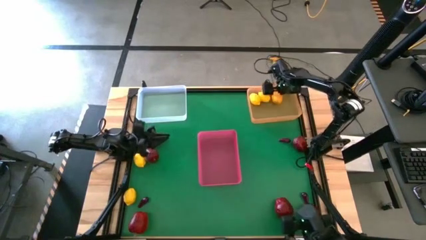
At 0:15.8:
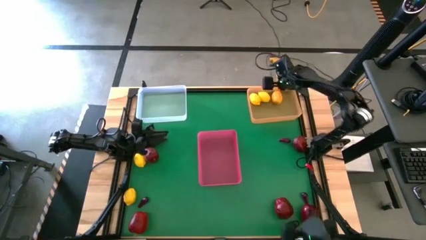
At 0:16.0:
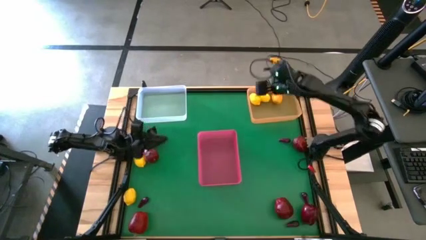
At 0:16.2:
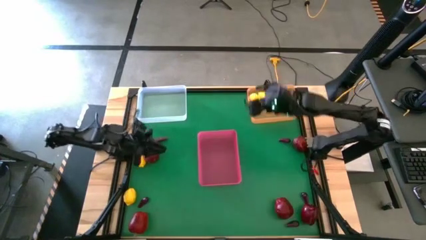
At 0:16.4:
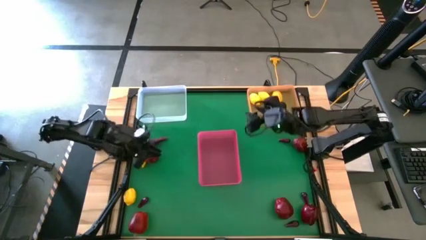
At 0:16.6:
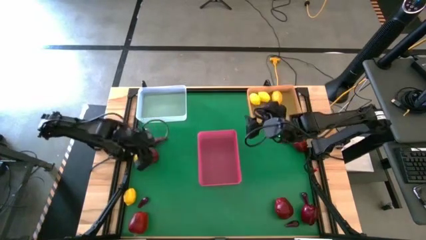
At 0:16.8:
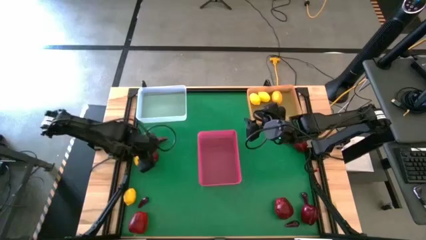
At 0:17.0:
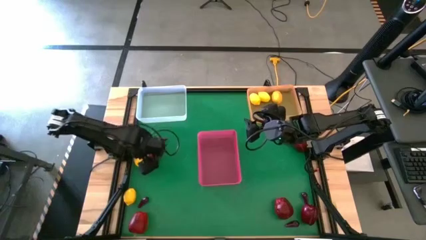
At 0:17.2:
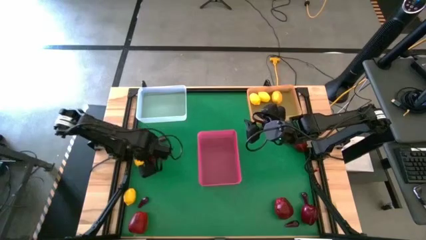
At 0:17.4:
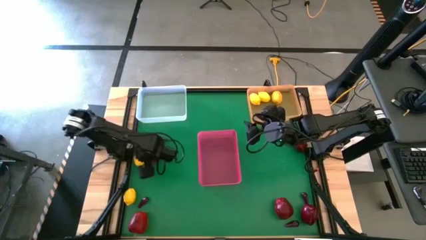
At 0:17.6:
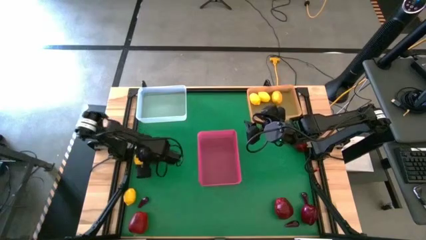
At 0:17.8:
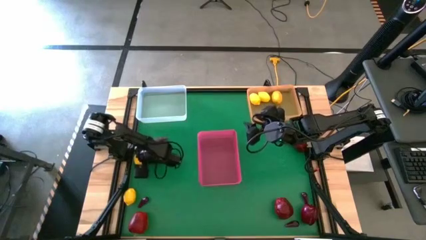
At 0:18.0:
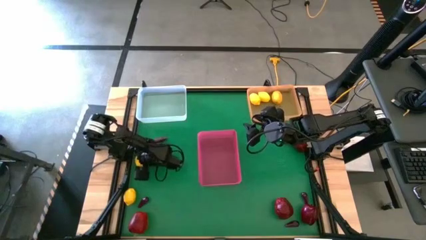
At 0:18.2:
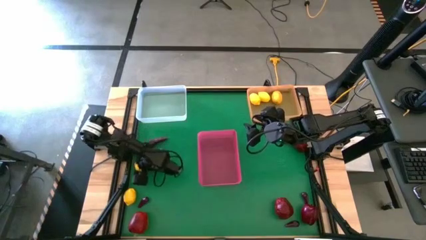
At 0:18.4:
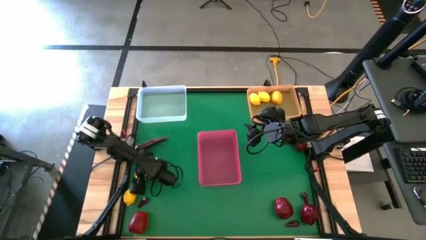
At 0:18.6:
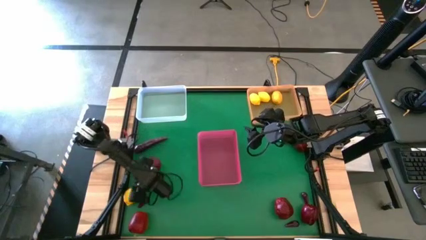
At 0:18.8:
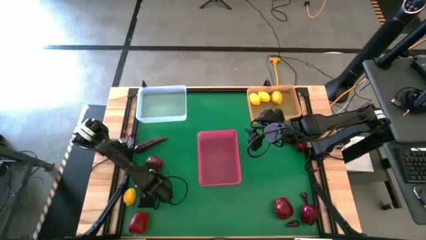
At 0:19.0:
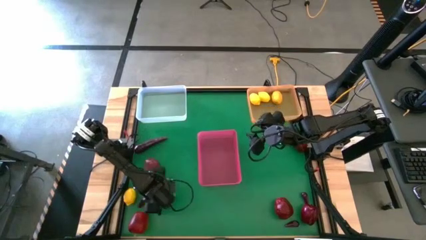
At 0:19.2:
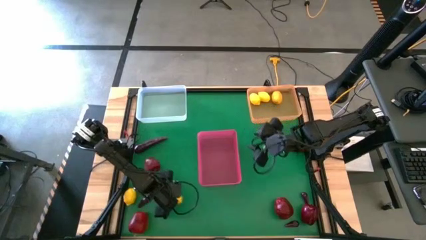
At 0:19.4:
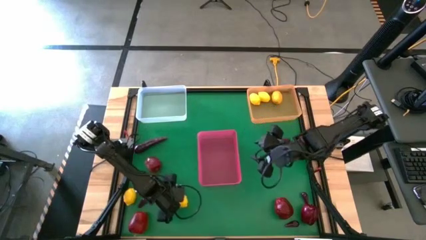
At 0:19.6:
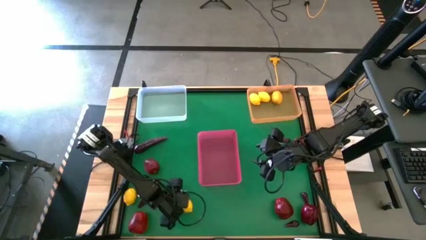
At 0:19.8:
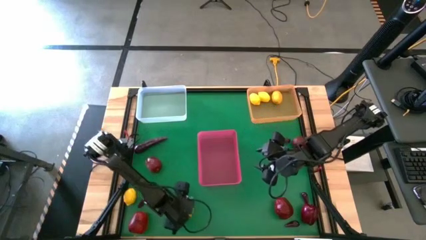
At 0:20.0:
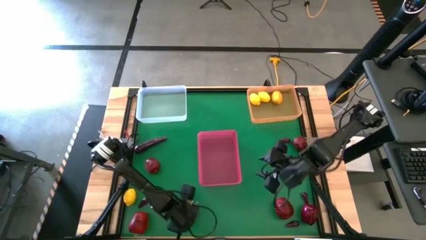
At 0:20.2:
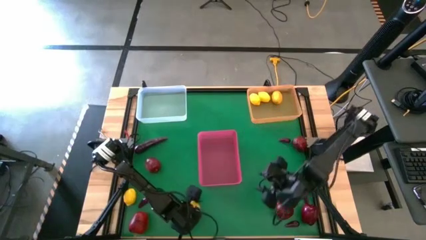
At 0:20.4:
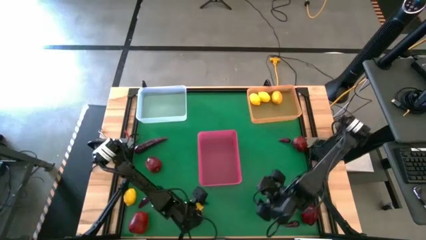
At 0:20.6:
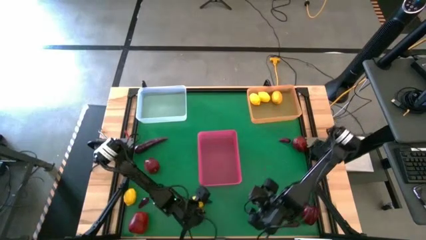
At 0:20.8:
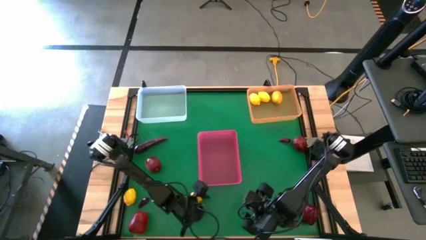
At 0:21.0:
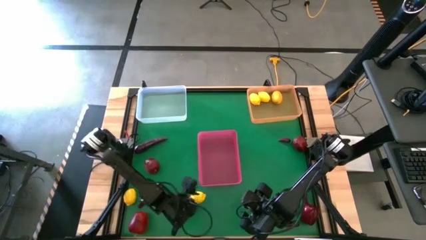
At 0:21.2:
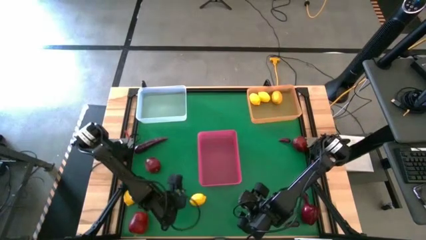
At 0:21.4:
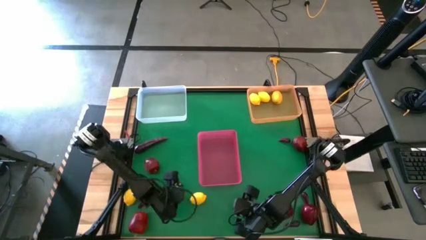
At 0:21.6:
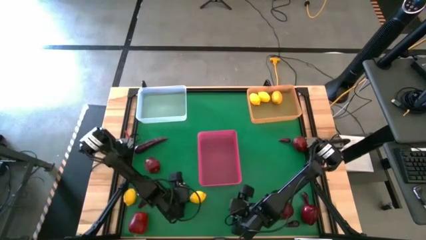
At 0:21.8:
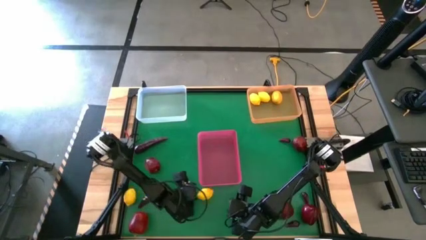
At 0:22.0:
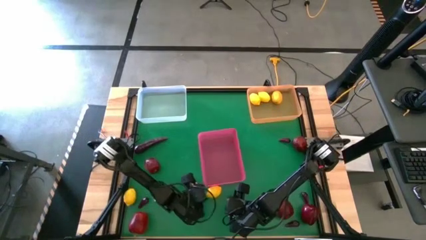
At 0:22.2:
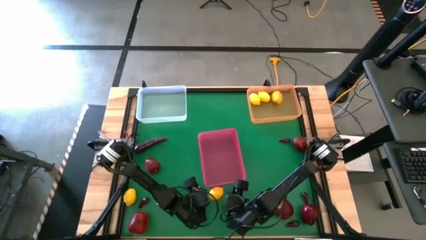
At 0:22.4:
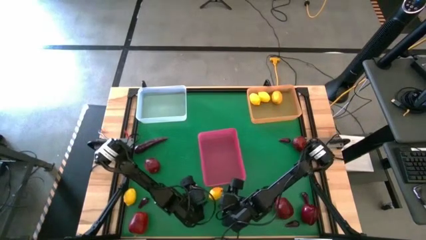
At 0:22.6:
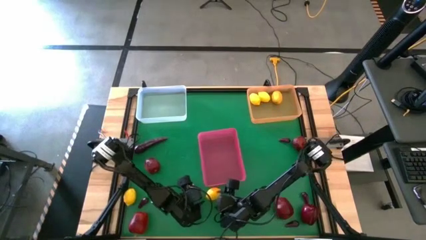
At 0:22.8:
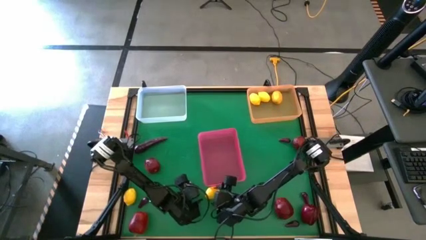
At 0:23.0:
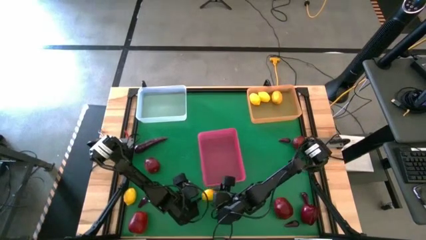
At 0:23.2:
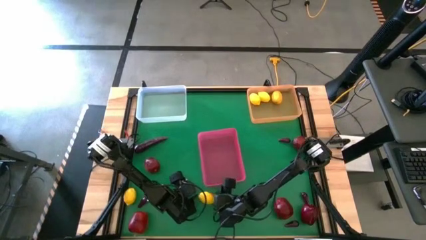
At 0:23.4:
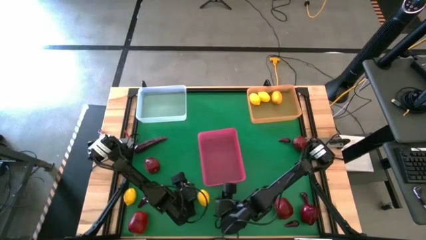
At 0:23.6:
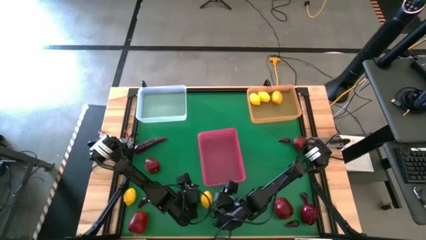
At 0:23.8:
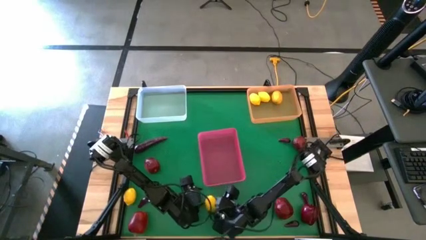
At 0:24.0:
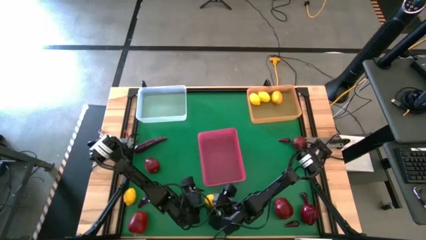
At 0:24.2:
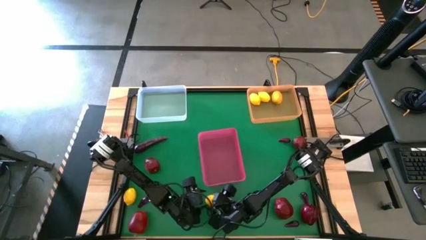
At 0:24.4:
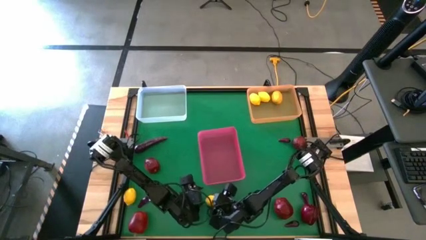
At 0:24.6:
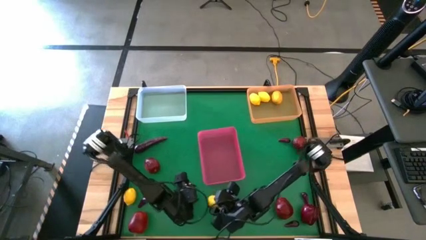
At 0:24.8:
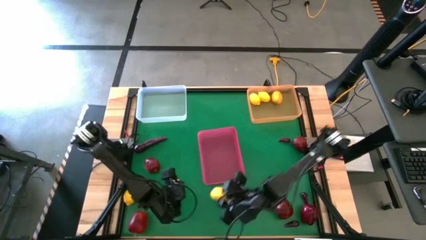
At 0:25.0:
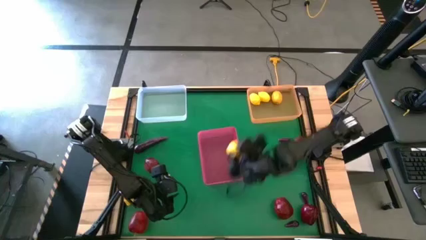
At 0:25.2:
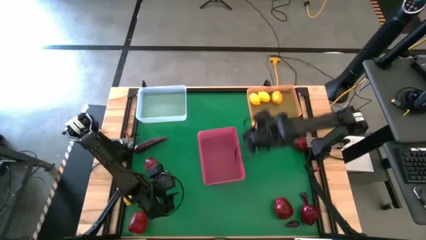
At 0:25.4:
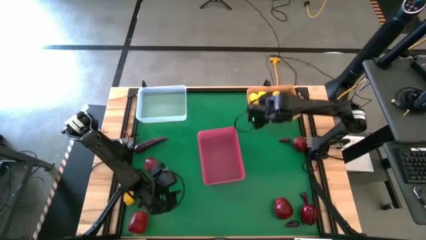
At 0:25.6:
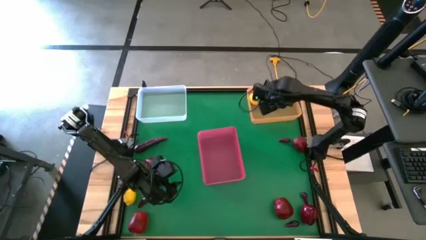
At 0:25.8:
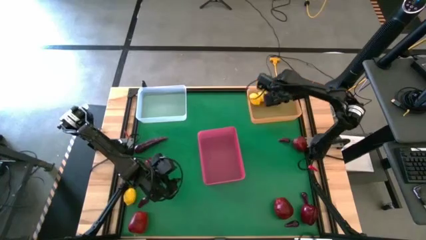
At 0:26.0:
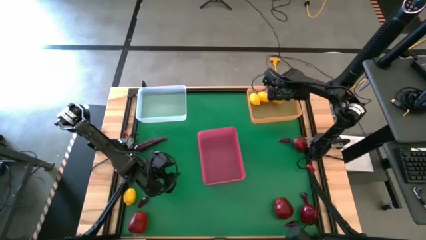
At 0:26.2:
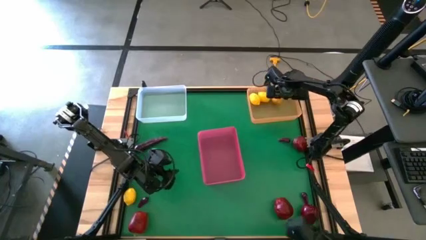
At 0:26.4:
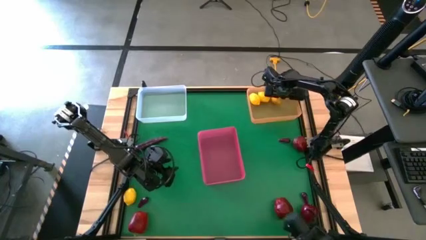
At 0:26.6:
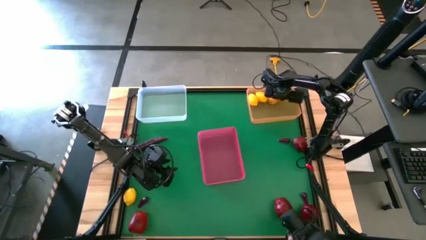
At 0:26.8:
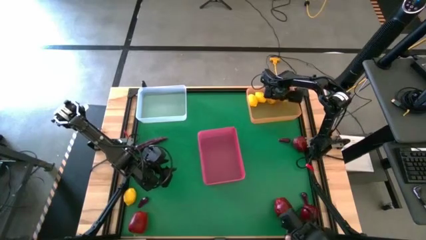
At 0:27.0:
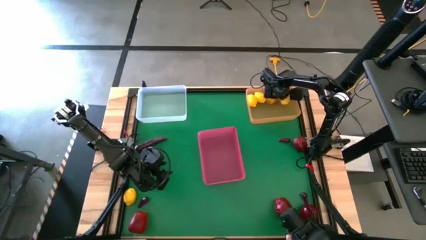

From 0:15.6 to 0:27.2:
Task: Sort produce into baskets
Put the lemon into the orange bin

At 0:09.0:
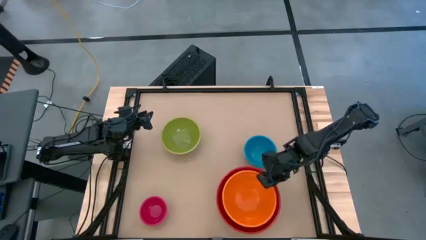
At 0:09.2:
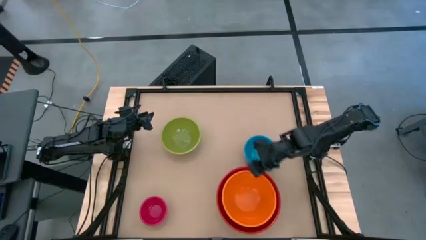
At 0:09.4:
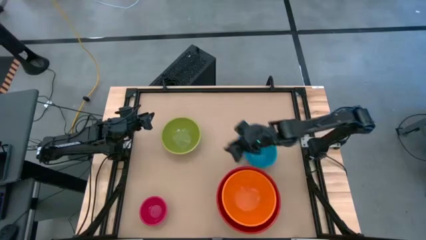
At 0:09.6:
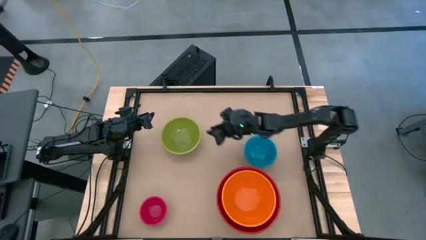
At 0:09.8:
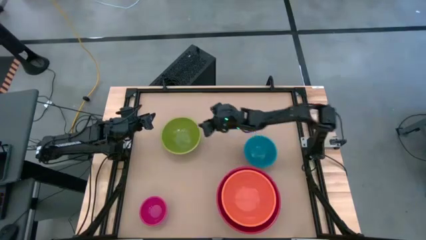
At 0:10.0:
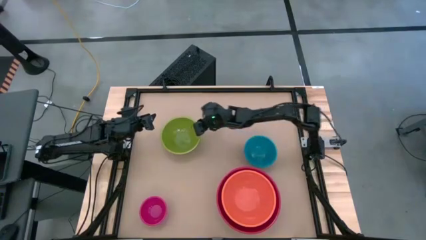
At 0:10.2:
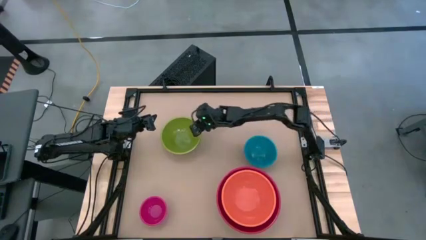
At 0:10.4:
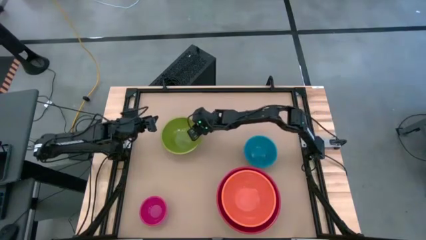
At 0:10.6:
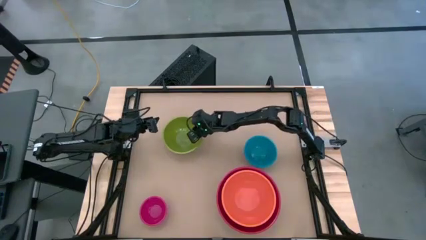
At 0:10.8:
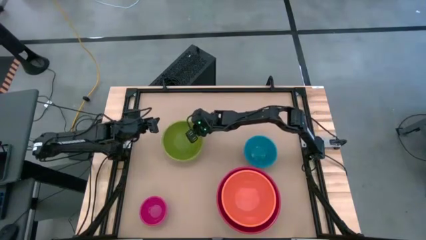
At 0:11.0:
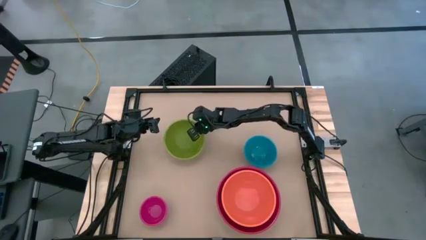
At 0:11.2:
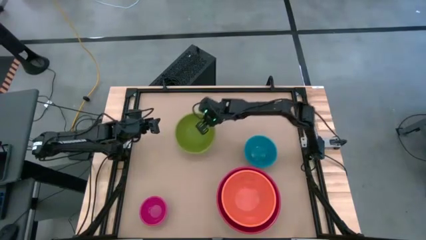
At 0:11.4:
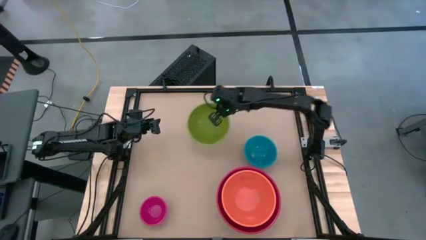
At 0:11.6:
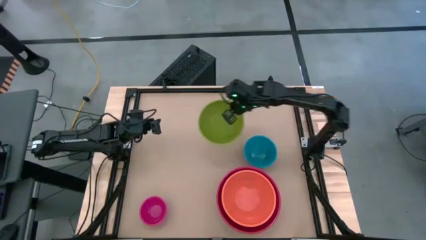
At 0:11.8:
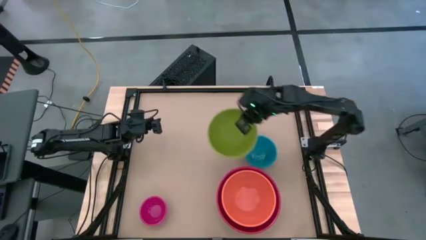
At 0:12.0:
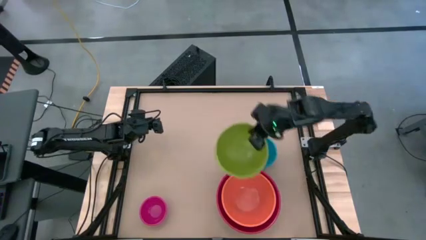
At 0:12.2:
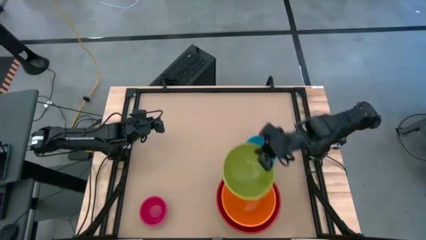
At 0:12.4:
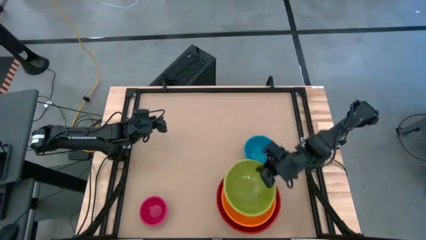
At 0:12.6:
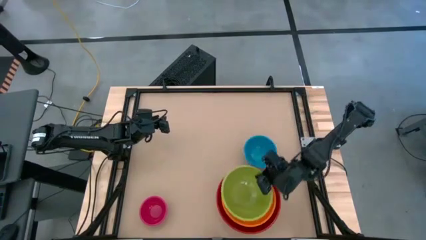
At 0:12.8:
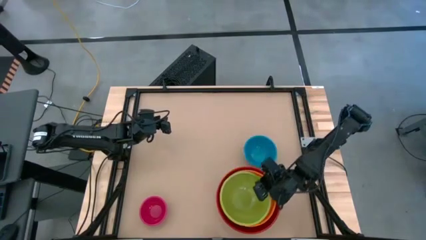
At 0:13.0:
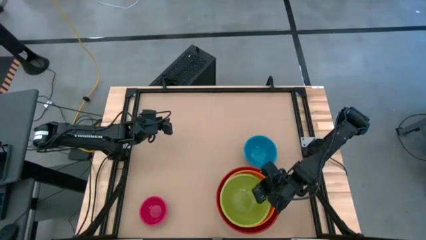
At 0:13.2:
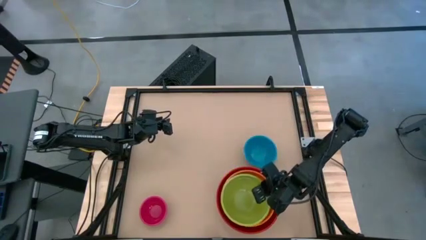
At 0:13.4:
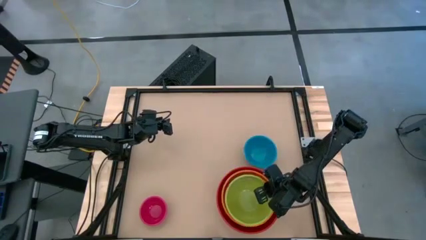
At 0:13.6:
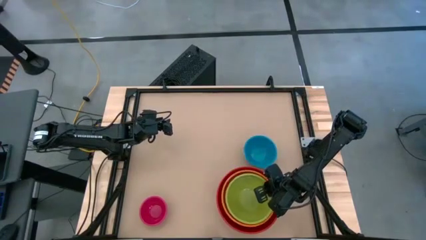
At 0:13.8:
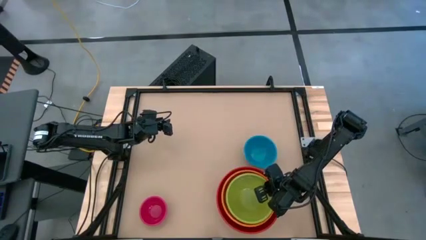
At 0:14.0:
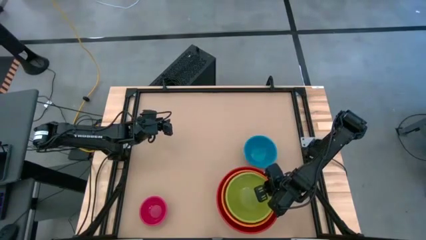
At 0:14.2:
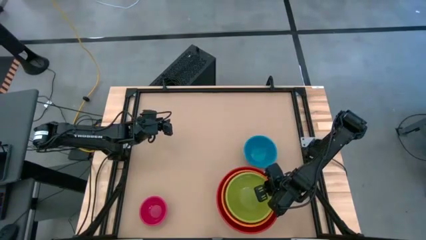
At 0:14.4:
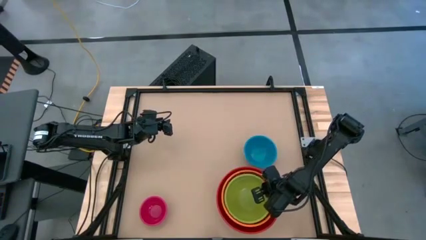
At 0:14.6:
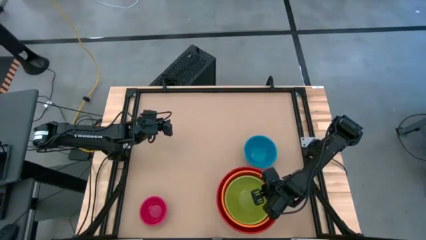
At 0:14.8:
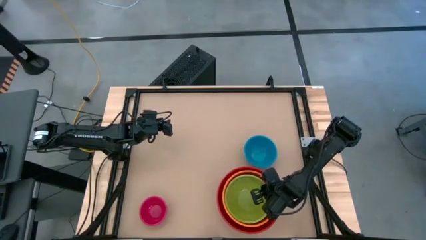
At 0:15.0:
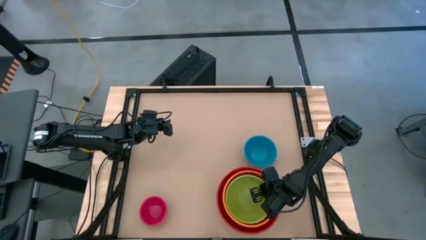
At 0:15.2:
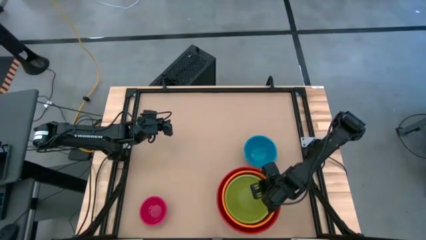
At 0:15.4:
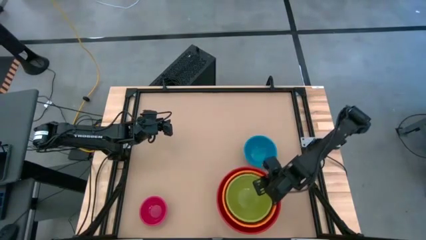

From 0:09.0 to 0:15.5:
Task: Nest bowls inside each other by size order
Stack the green bowl on the orange bowl
